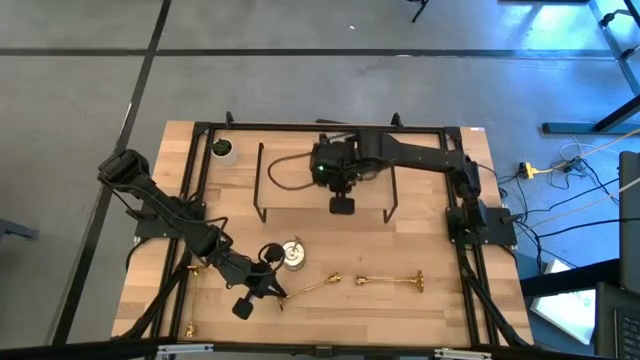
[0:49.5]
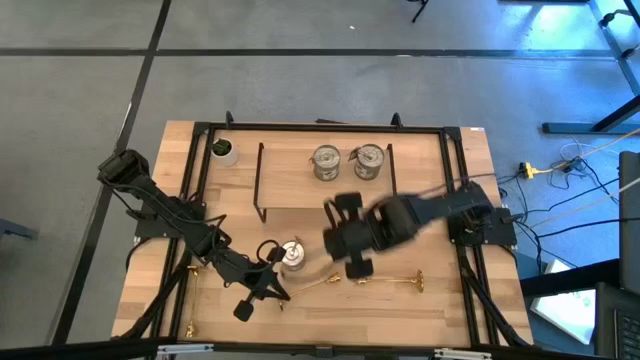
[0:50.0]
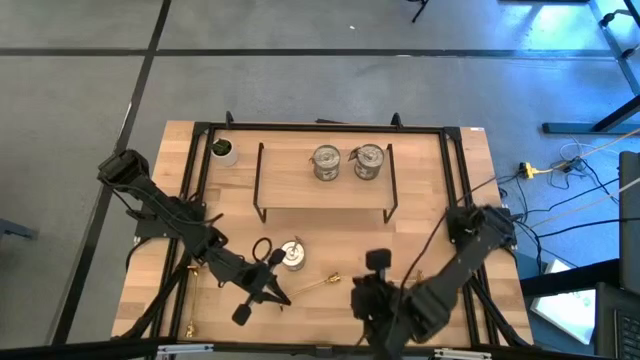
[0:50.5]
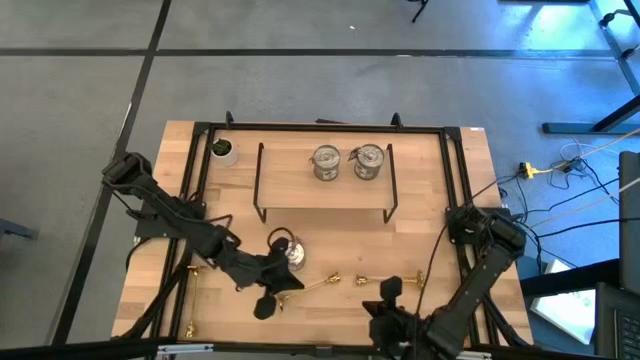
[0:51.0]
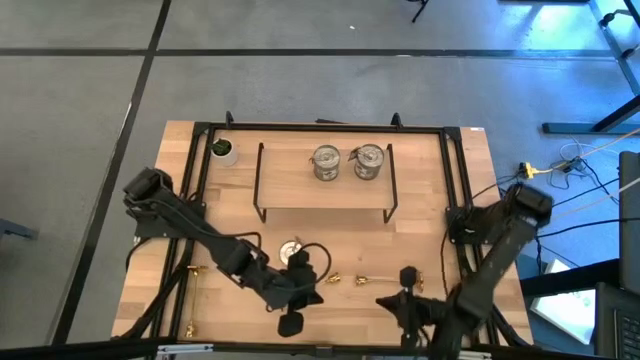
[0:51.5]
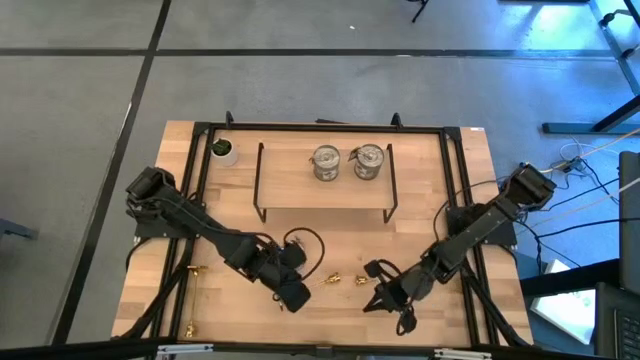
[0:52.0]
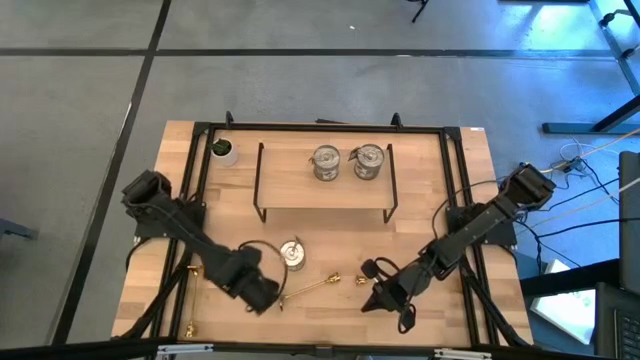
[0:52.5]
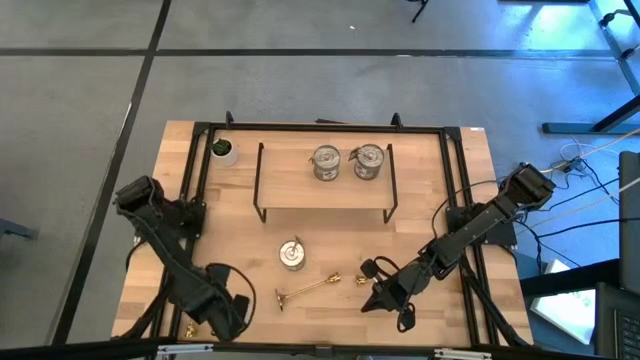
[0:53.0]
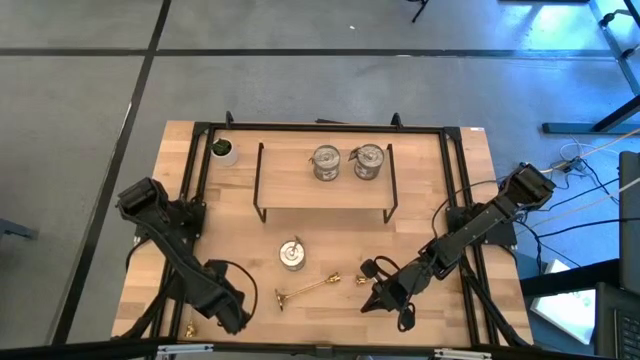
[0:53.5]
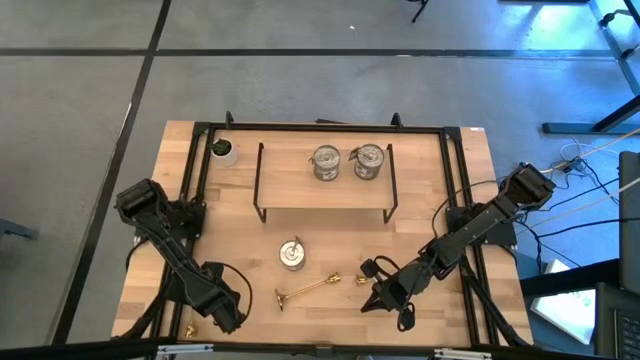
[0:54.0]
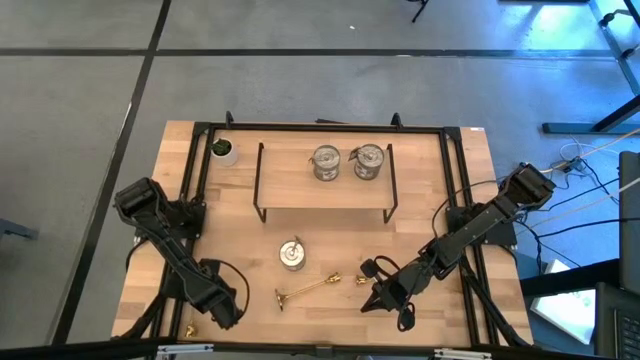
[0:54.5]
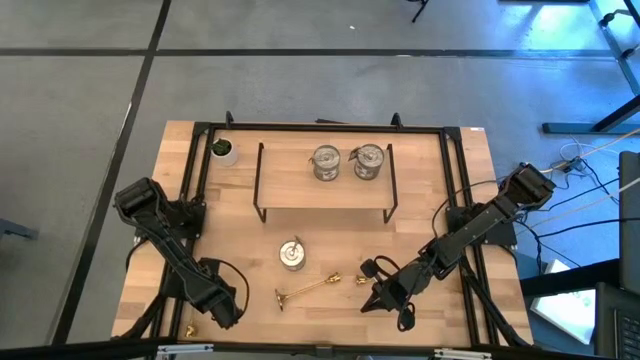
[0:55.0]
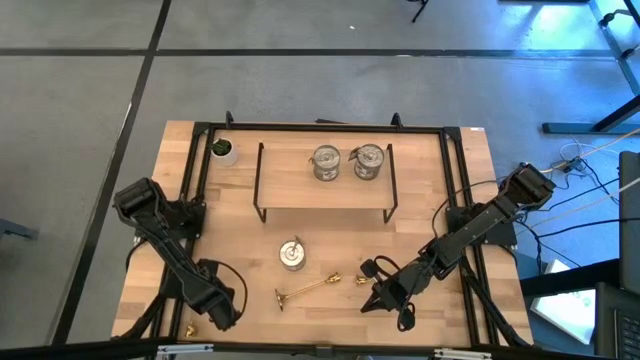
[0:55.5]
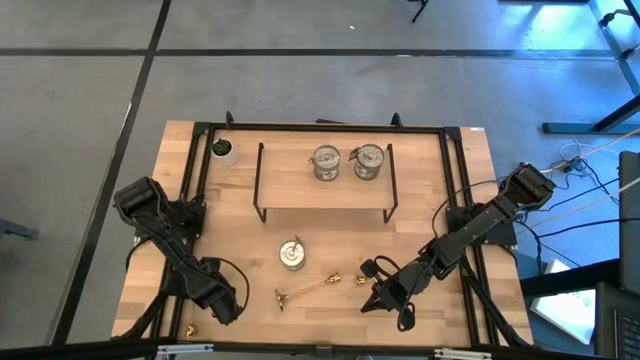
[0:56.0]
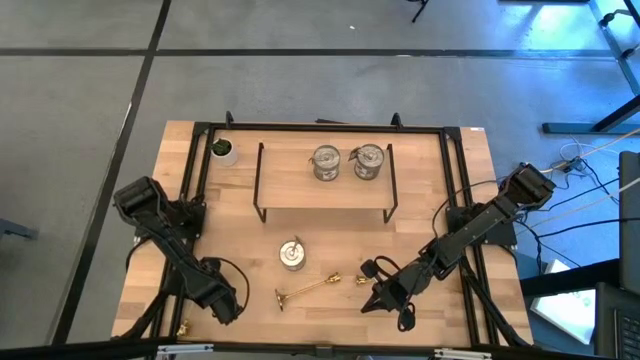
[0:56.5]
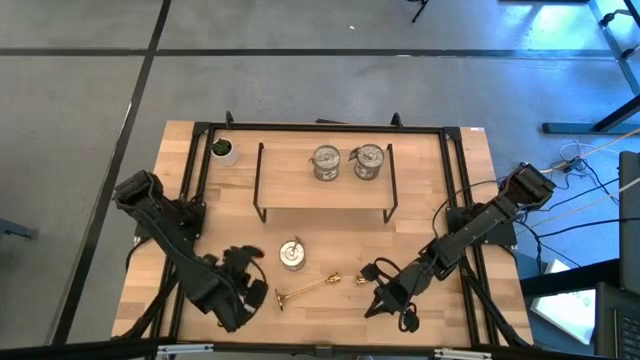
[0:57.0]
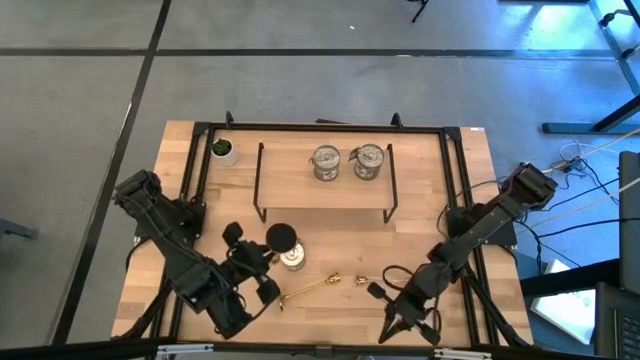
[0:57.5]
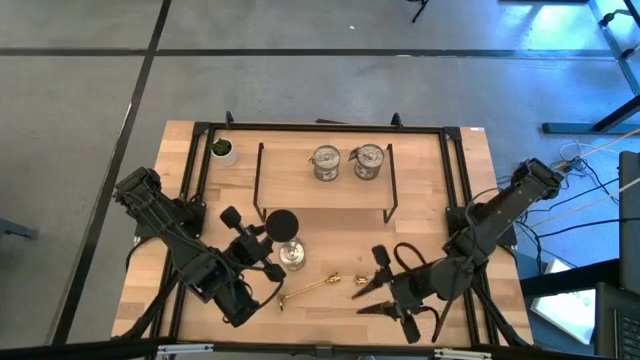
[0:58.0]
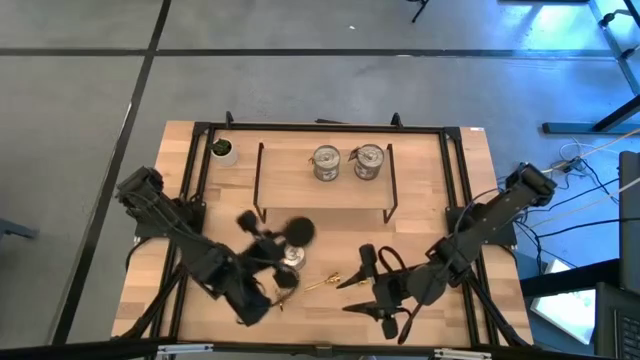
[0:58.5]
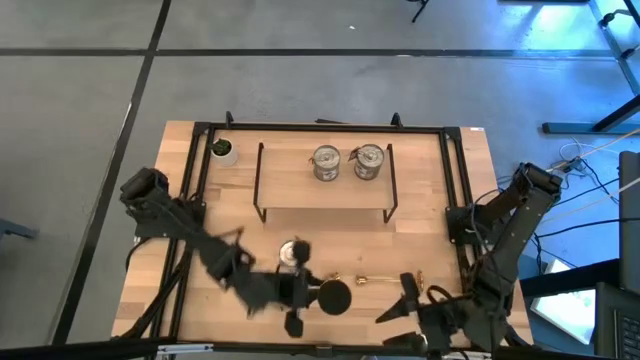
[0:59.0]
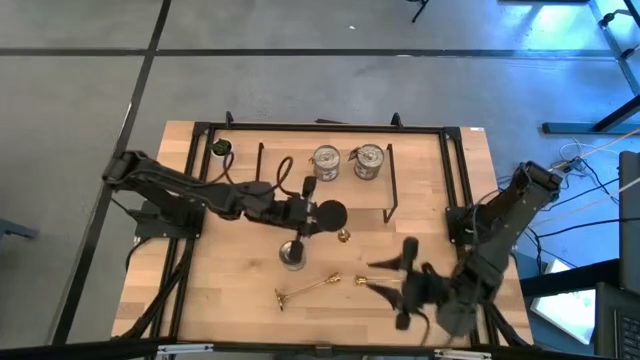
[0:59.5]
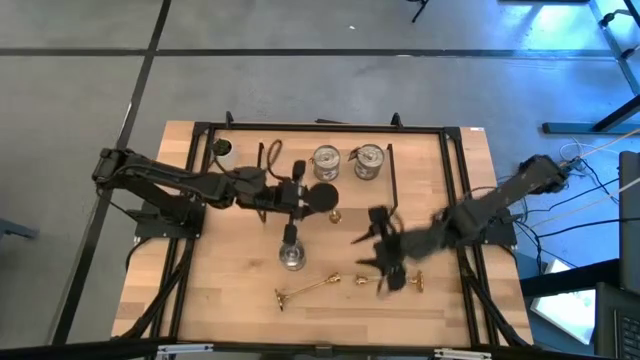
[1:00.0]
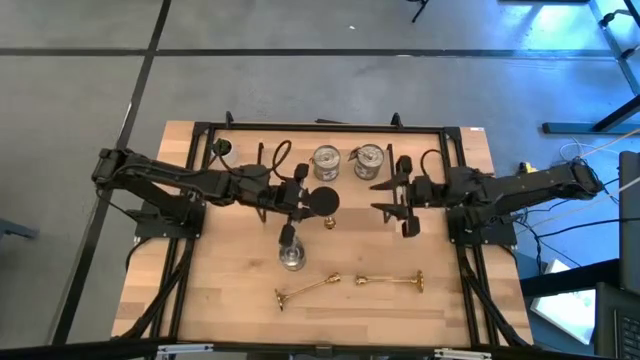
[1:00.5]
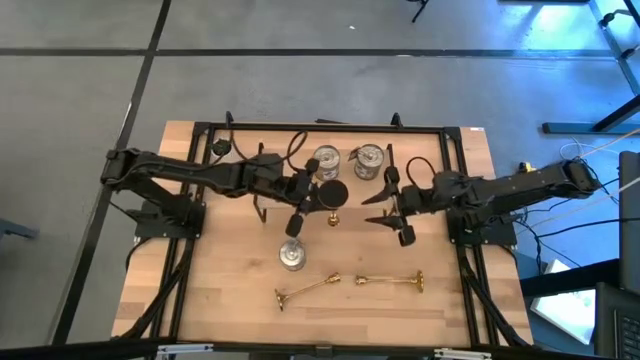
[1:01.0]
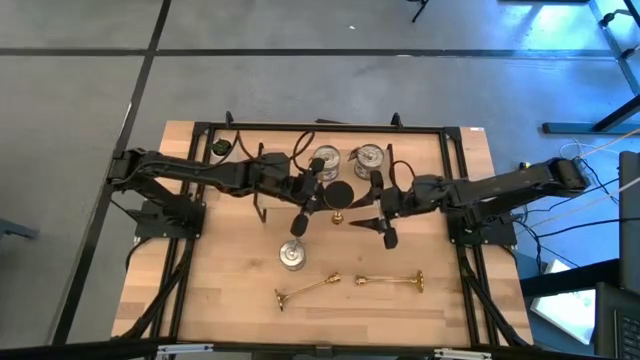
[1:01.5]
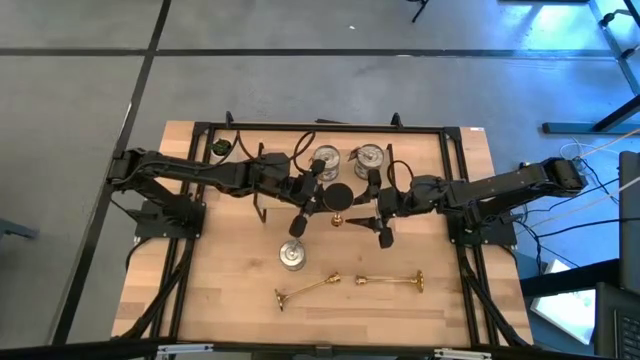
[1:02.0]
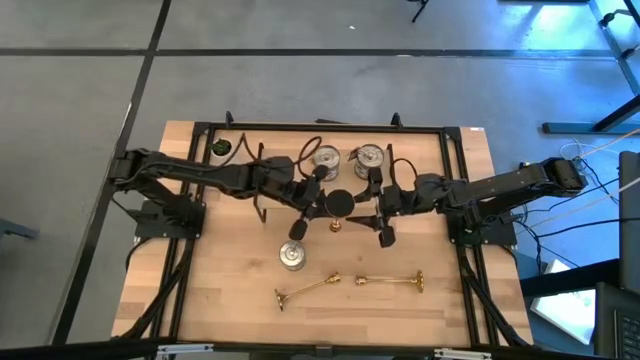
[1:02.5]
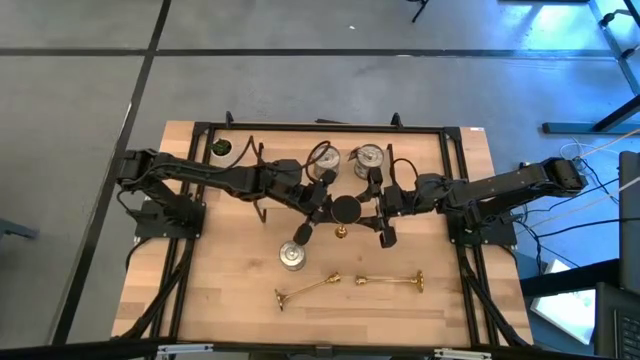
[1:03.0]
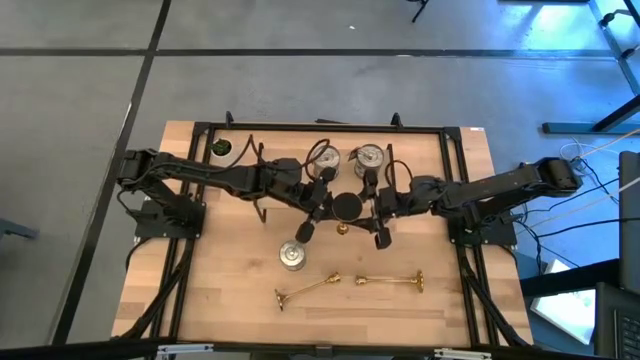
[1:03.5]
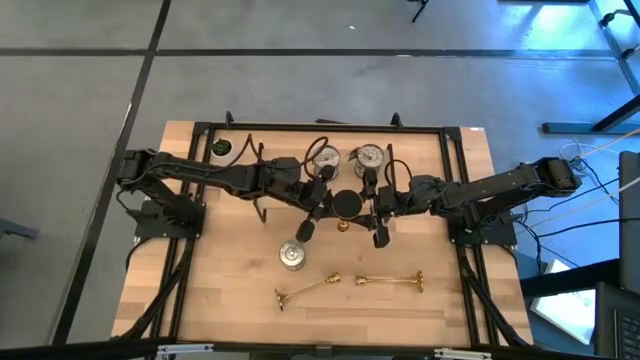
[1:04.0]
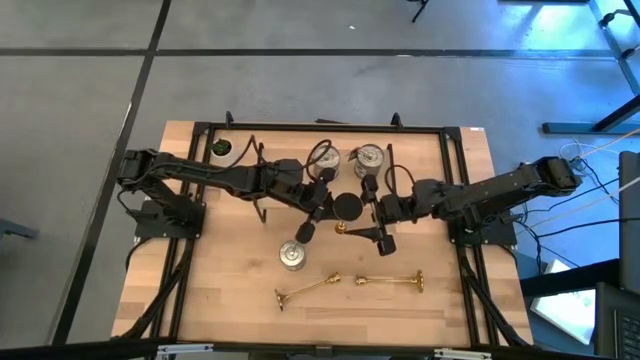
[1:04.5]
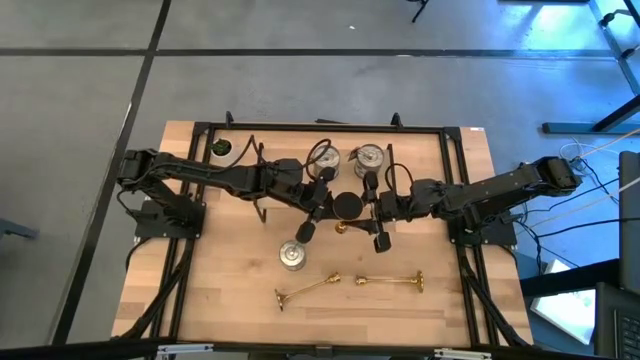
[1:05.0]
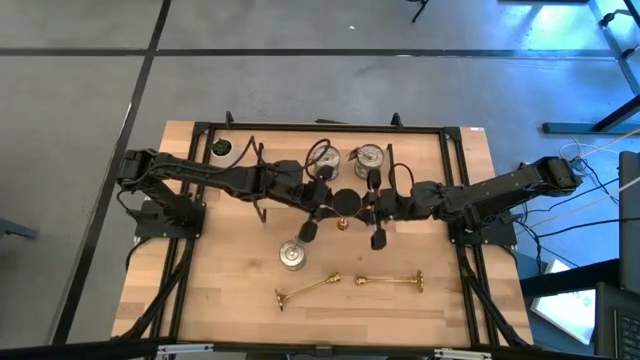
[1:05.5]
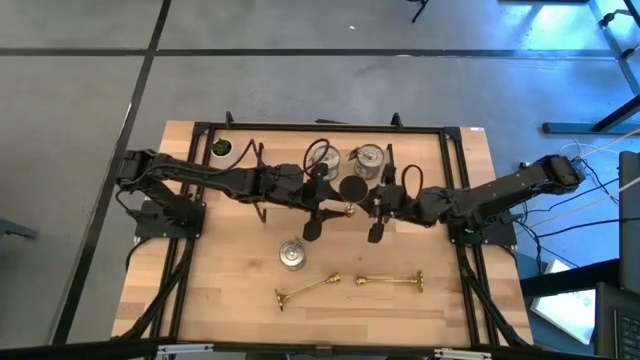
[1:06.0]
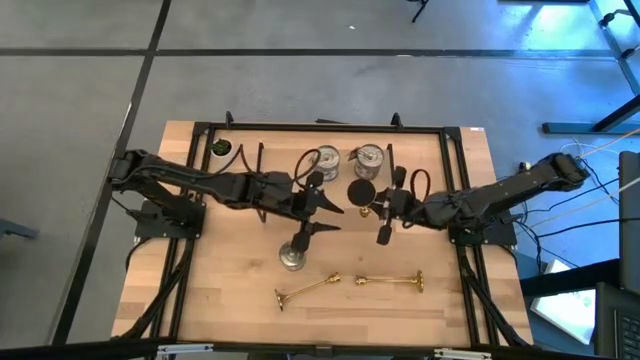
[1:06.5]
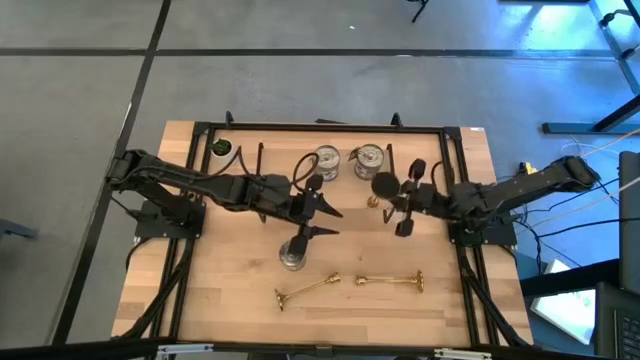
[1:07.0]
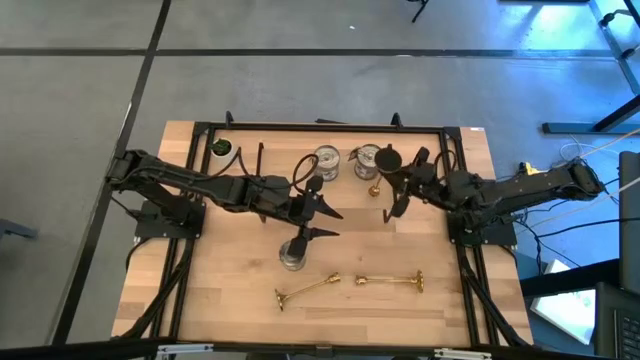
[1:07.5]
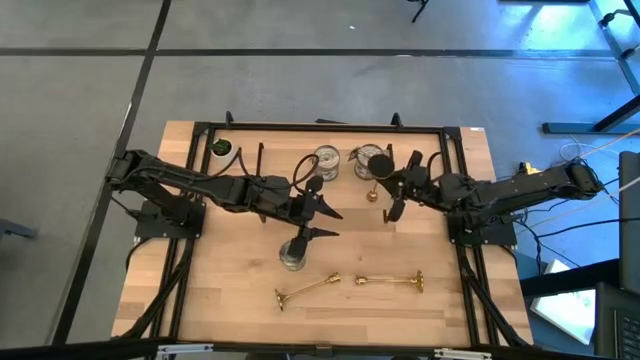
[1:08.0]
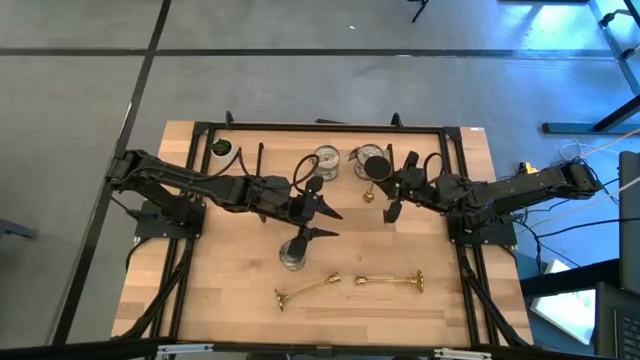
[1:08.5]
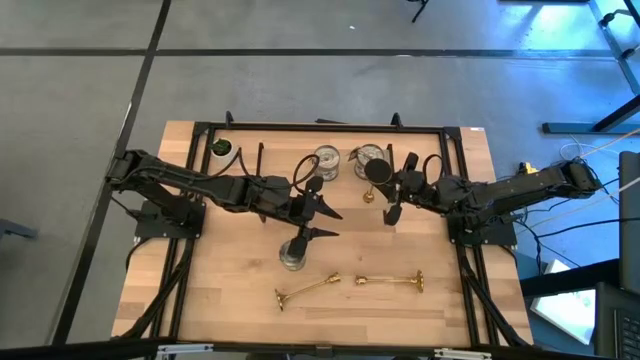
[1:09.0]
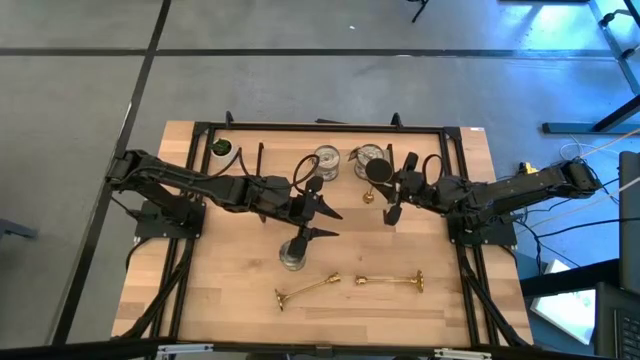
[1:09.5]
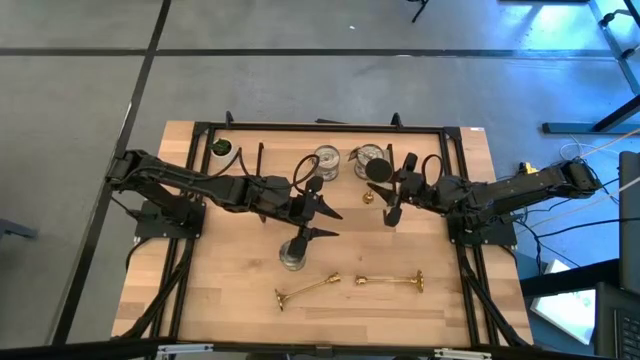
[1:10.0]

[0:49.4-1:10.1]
Task: Pick & Place candle stick holders
Put the left gold candle holder on the shelf
